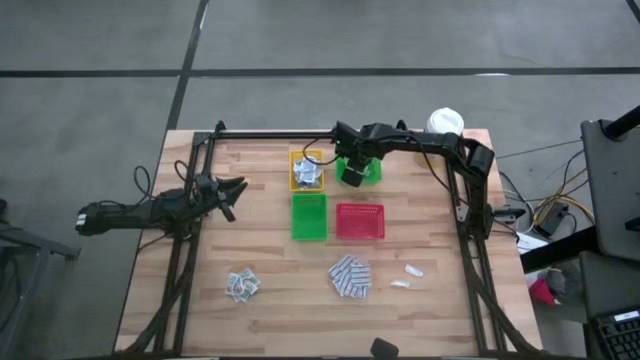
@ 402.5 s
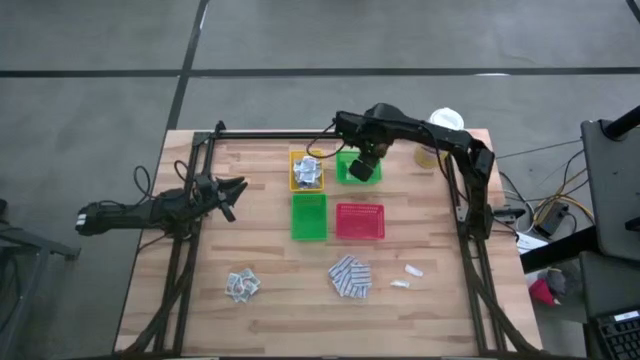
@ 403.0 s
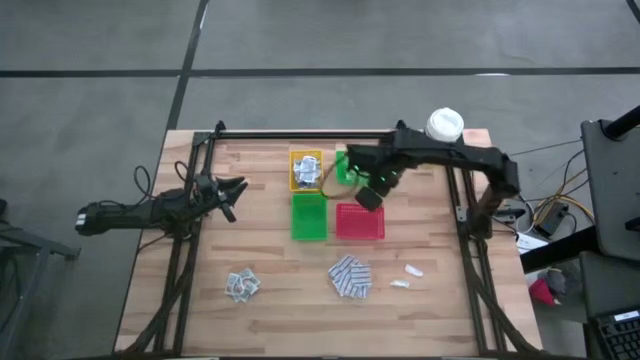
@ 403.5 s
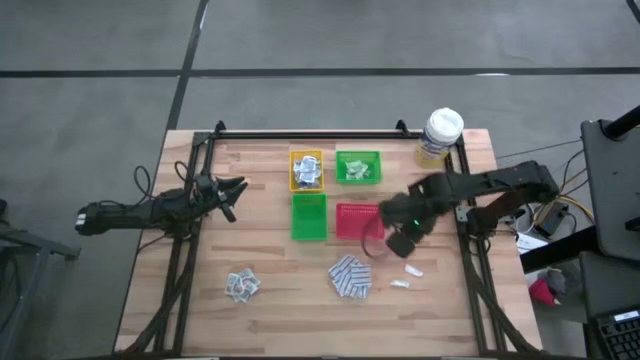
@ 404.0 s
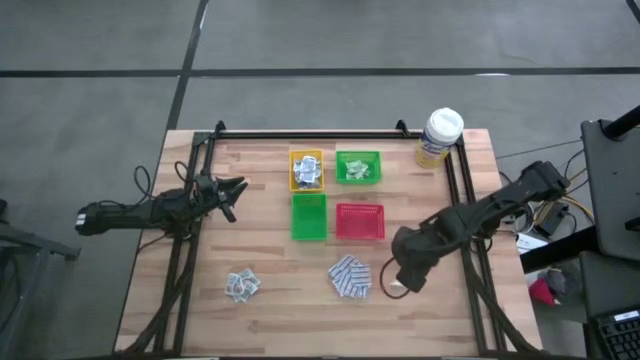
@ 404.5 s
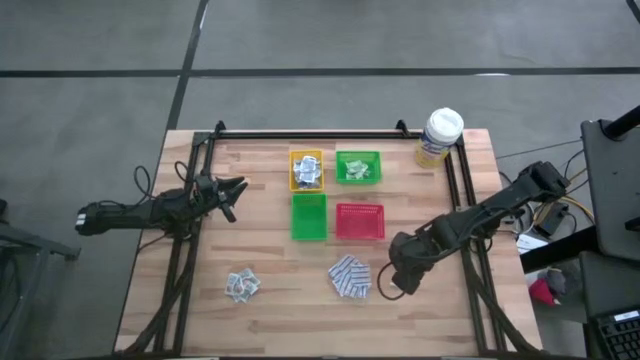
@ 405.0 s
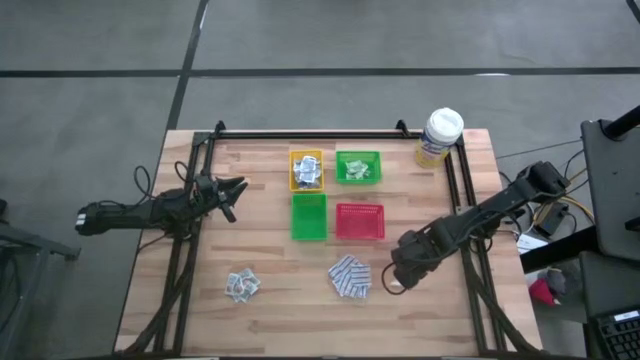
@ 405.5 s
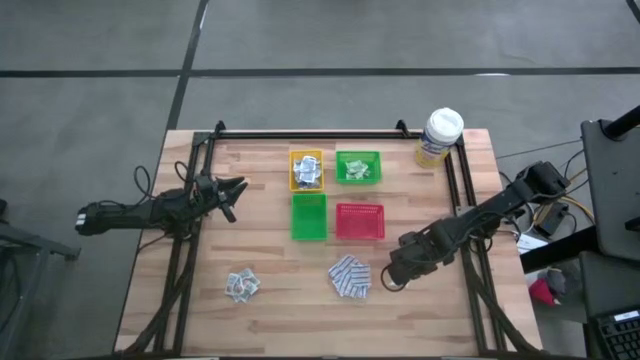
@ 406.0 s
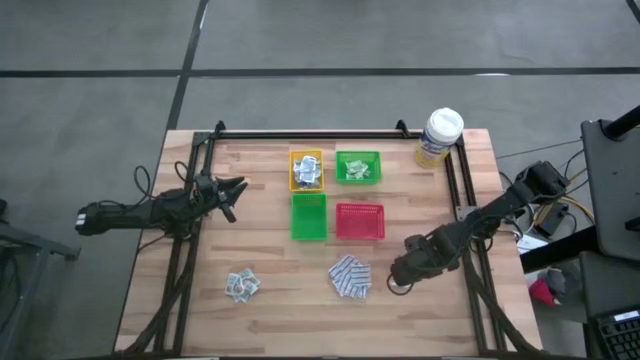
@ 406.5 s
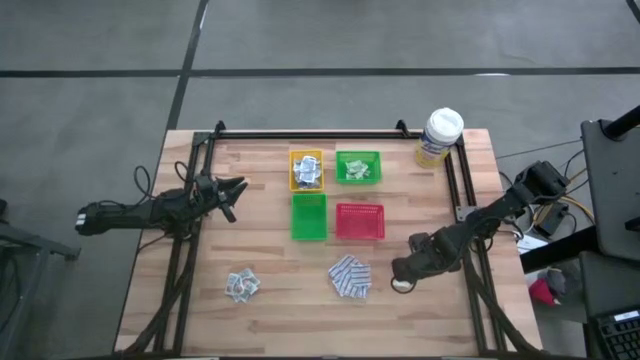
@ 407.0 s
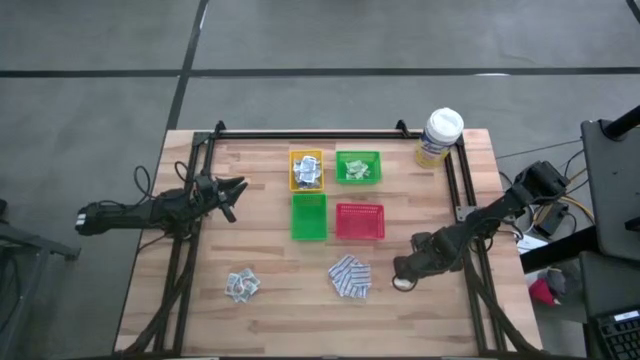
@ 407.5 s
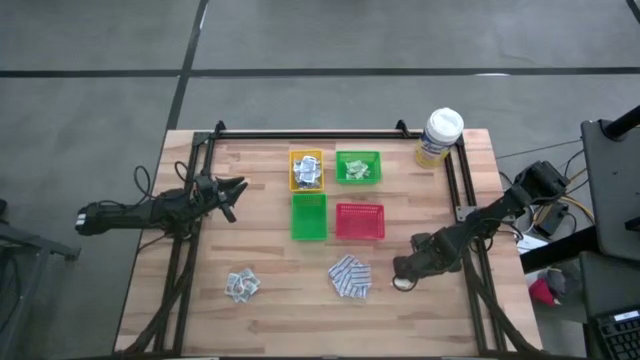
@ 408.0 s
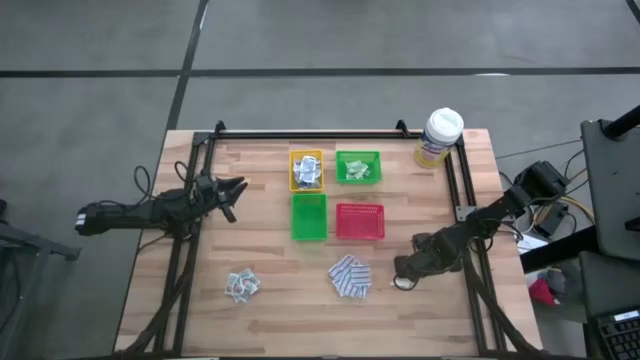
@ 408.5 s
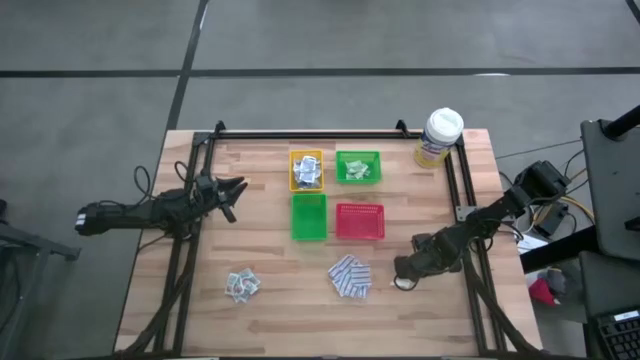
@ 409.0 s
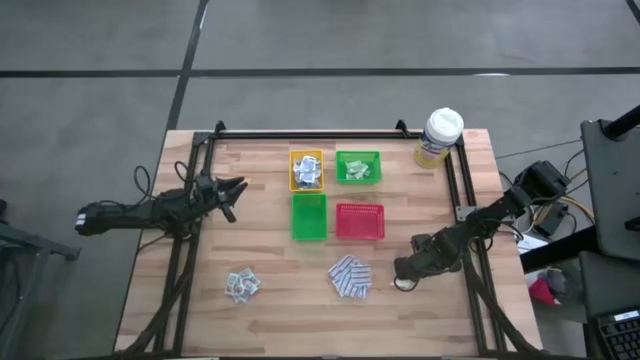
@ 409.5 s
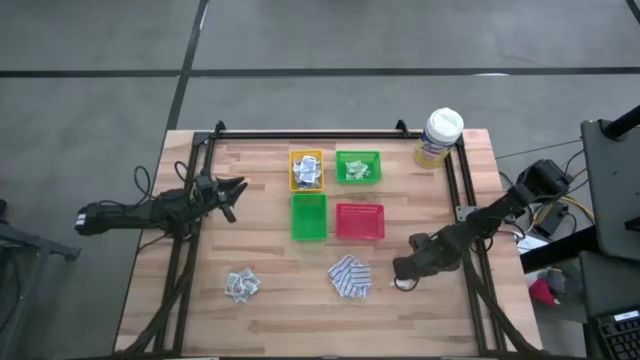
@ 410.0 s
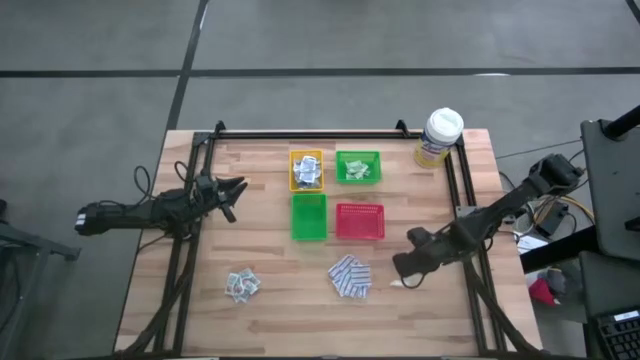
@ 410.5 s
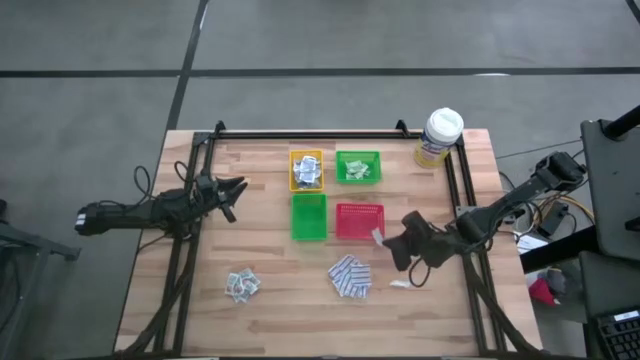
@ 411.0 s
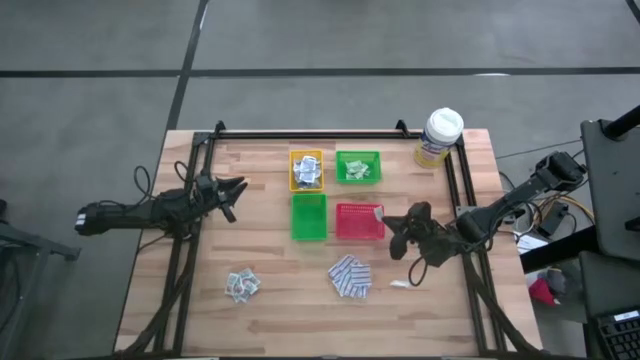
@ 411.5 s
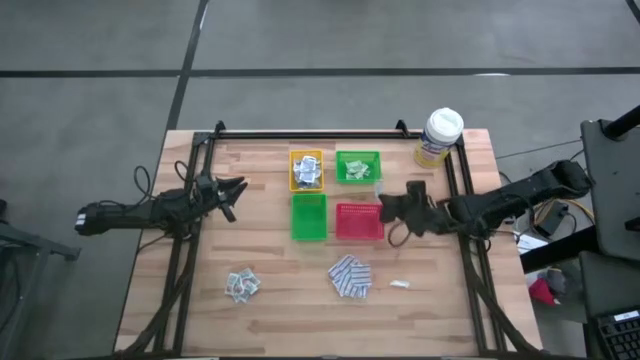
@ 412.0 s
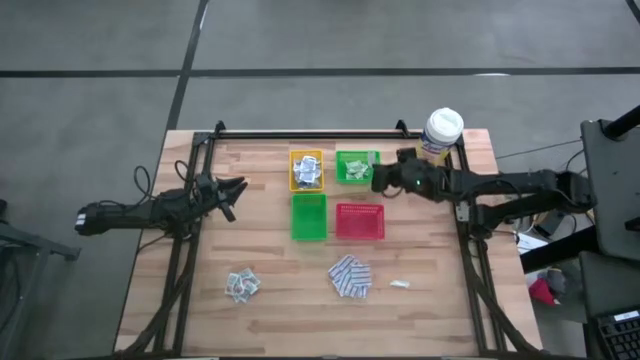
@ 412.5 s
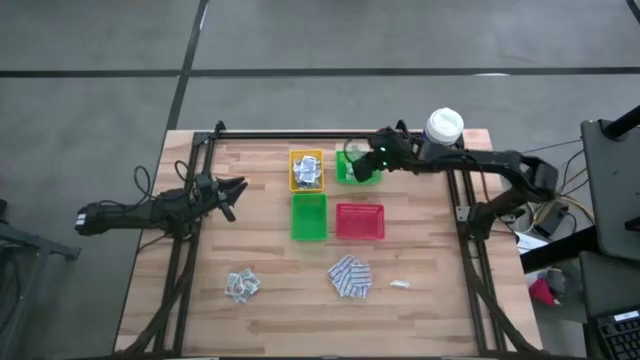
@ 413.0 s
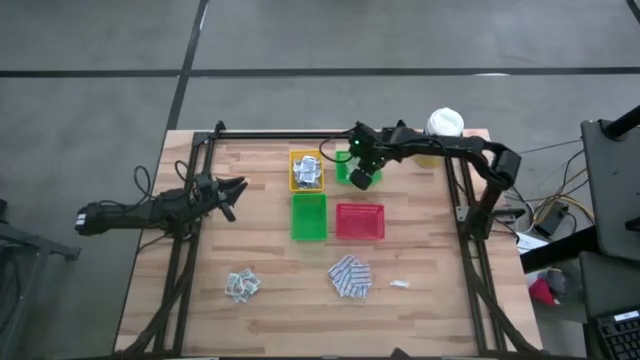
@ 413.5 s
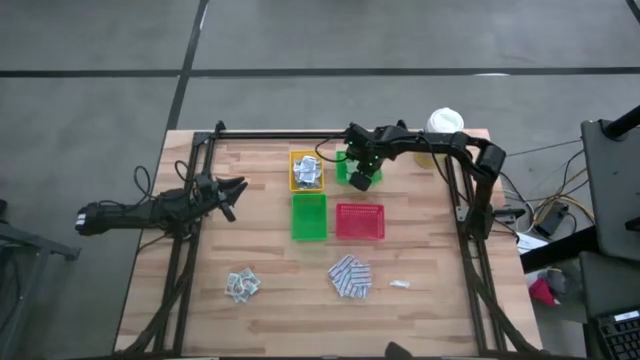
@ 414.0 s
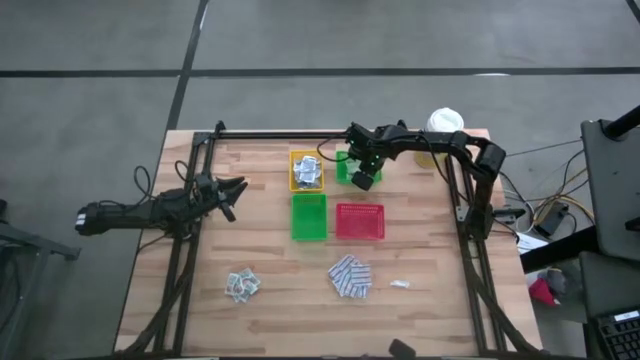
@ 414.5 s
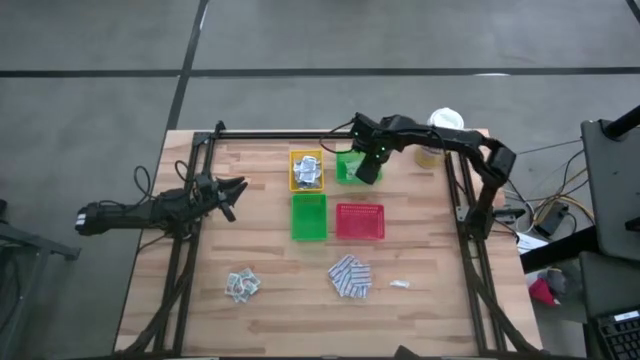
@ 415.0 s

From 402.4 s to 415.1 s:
Task: Pick & Place First Aid Supplies
Put the green bandage pack into the top green bin

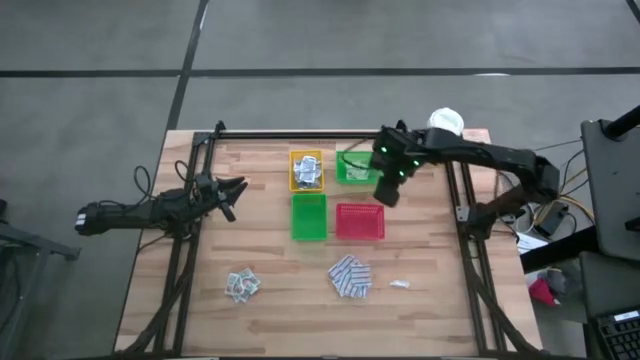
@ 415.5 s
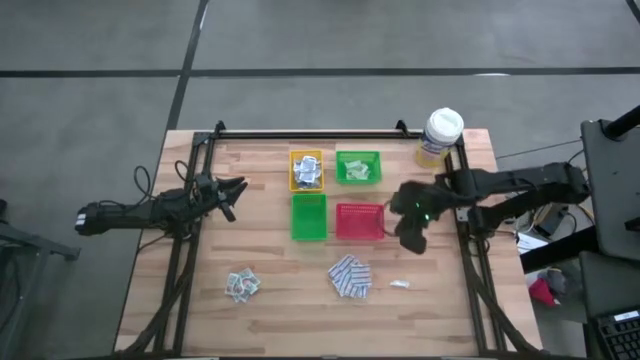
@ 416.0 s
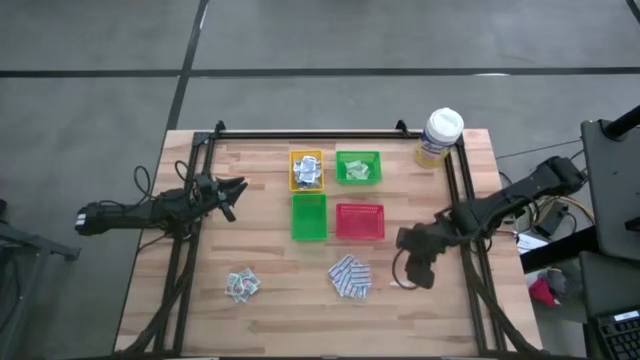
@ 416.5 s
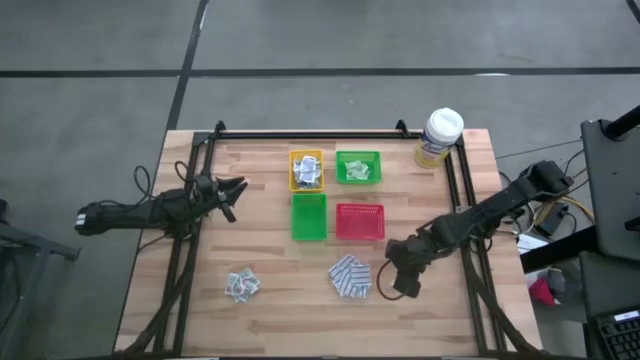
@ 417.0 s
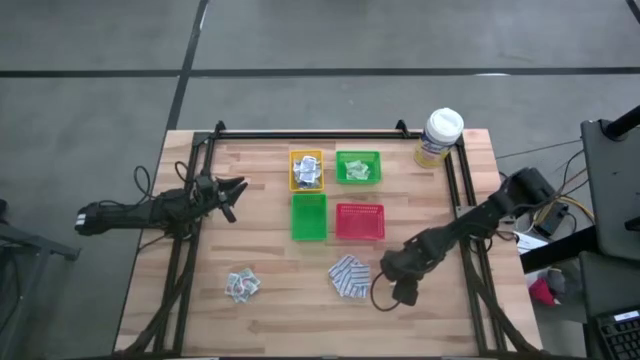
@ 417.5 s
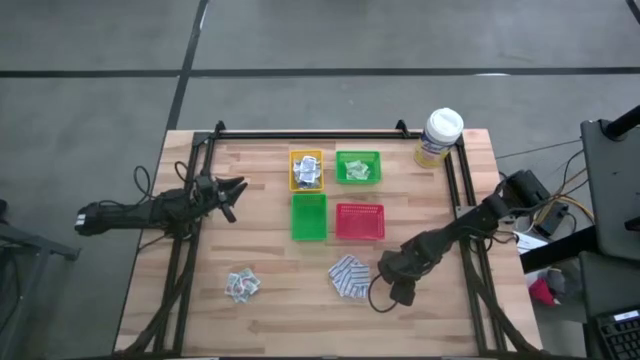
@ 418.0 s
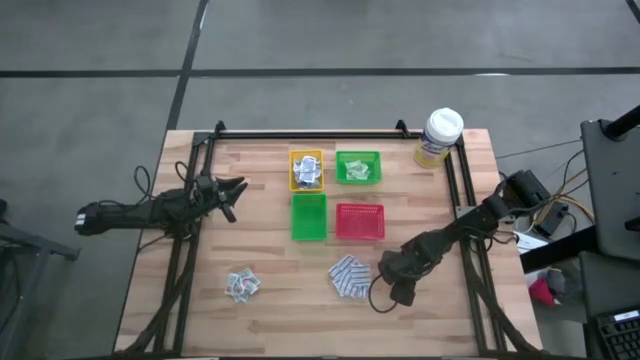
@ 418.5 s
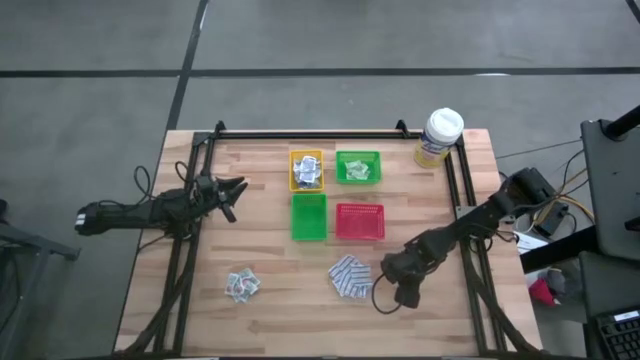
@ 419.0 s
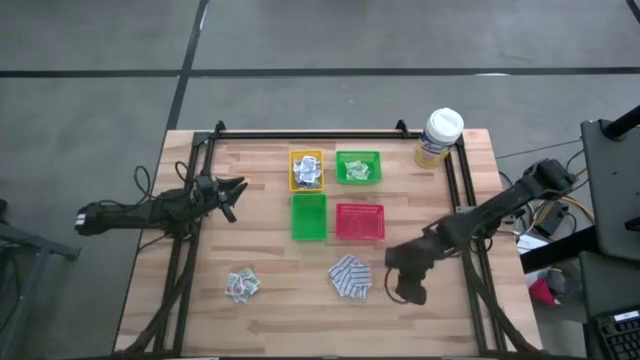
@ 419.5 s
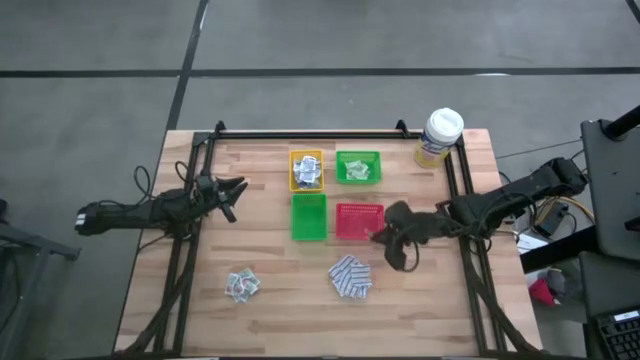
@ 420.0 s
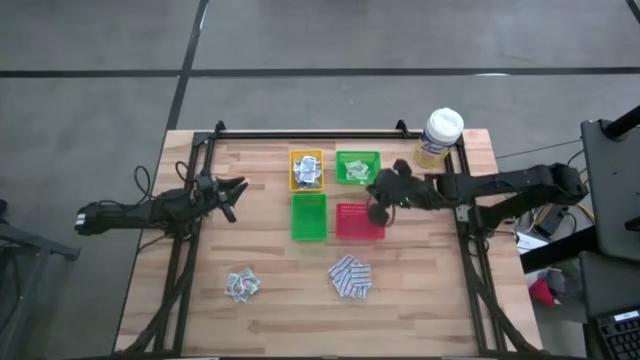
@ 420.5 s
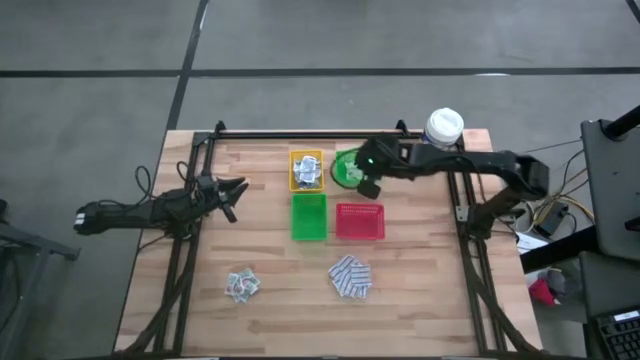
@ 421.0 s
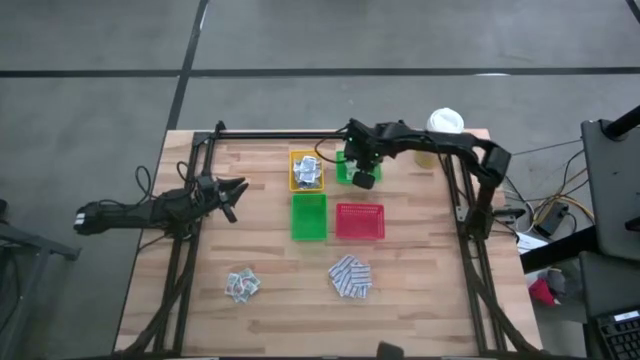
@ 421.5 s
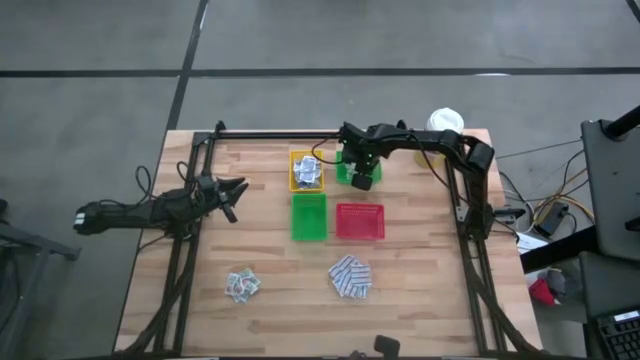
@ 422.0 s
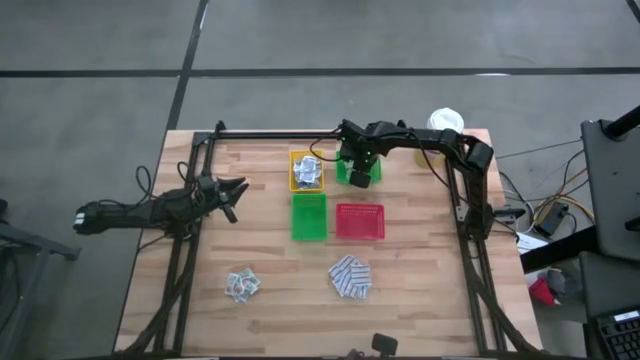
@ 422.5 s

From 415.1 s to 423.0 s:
Put the green bandage pack into the top green bin
